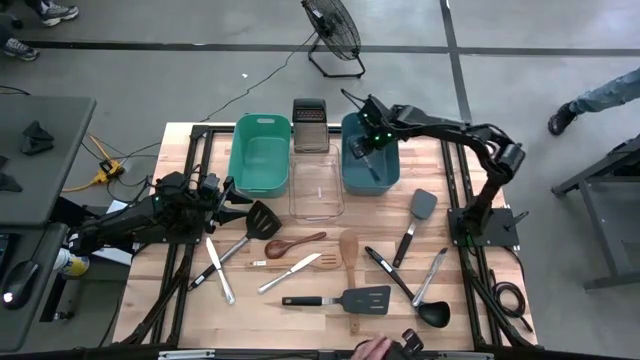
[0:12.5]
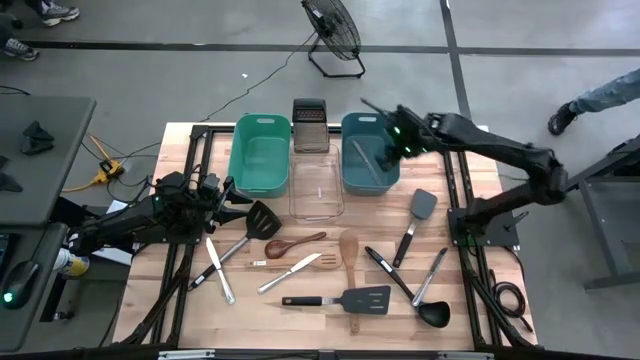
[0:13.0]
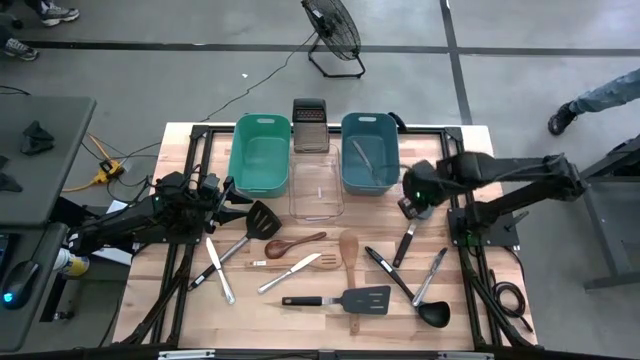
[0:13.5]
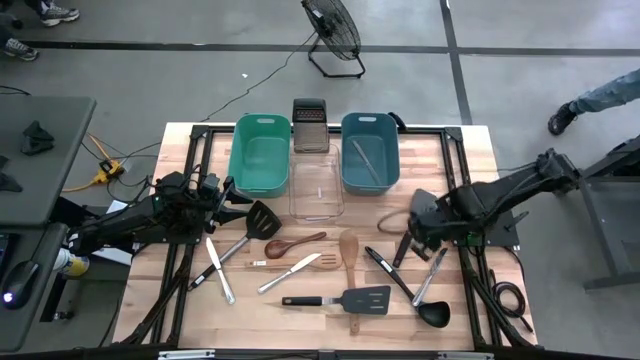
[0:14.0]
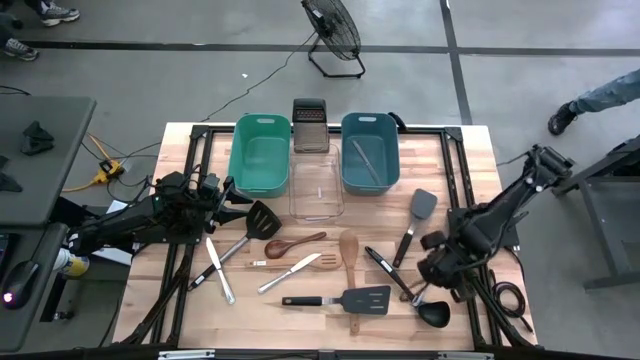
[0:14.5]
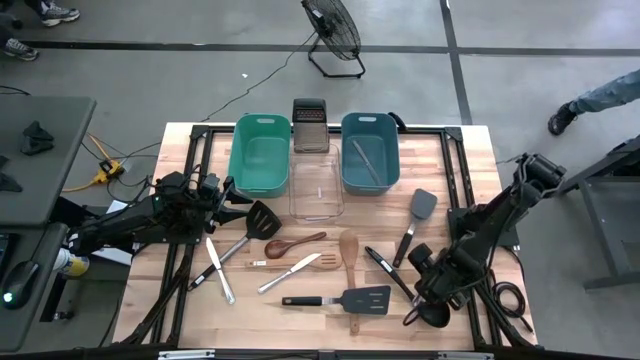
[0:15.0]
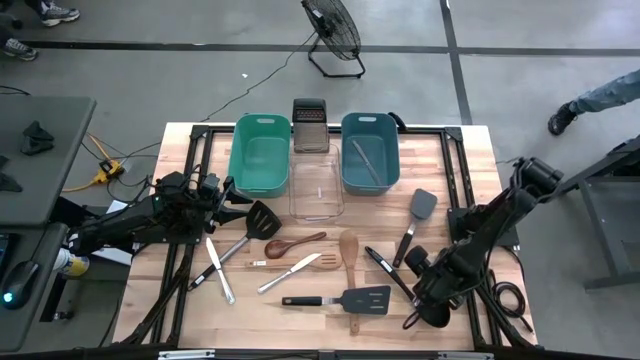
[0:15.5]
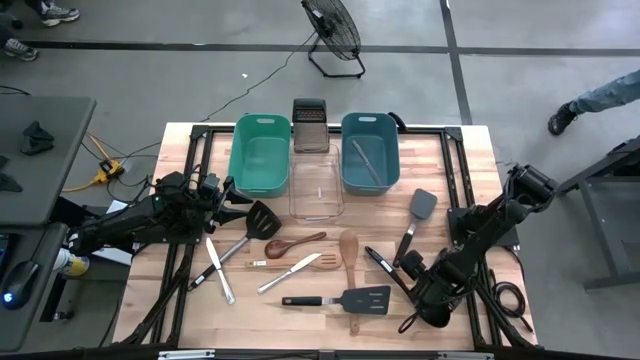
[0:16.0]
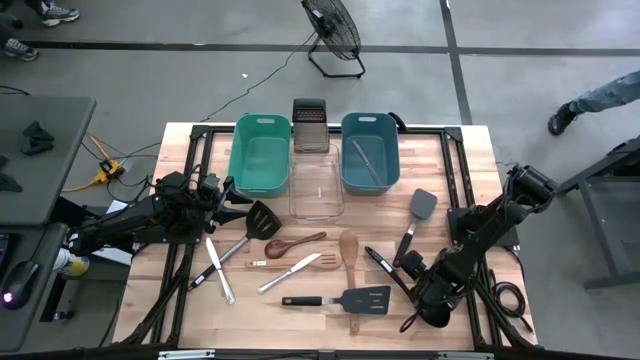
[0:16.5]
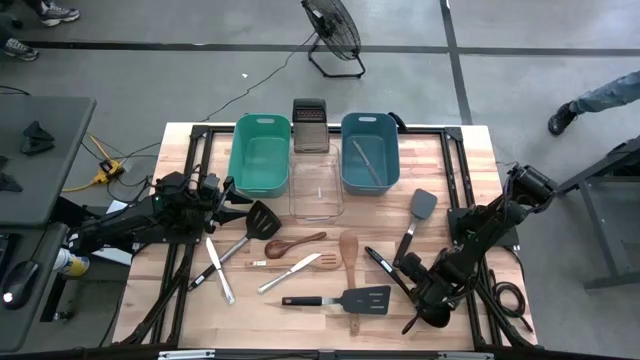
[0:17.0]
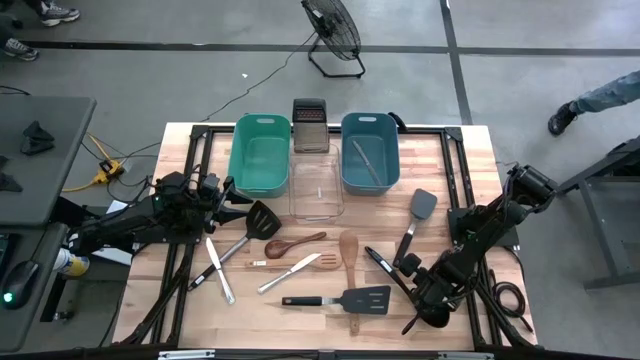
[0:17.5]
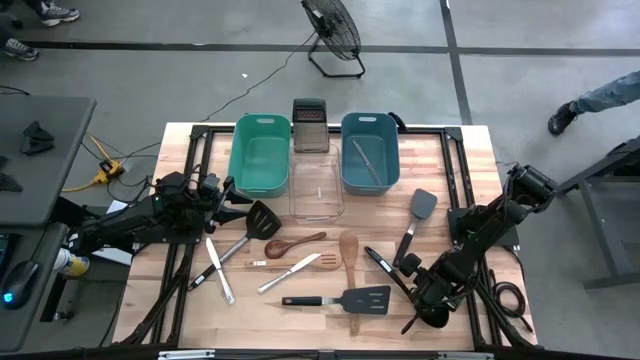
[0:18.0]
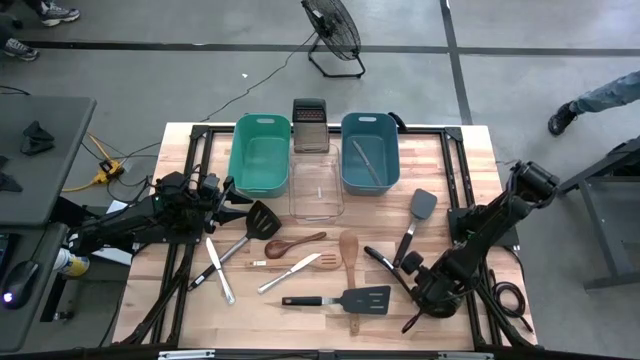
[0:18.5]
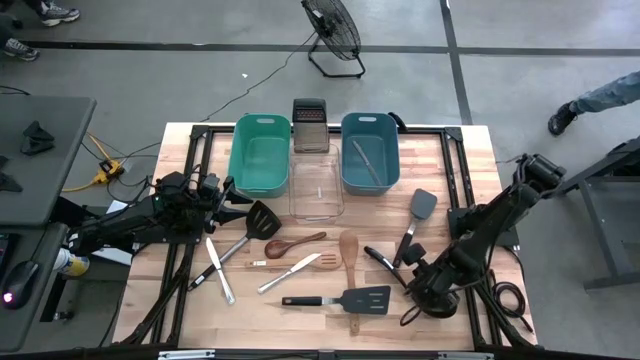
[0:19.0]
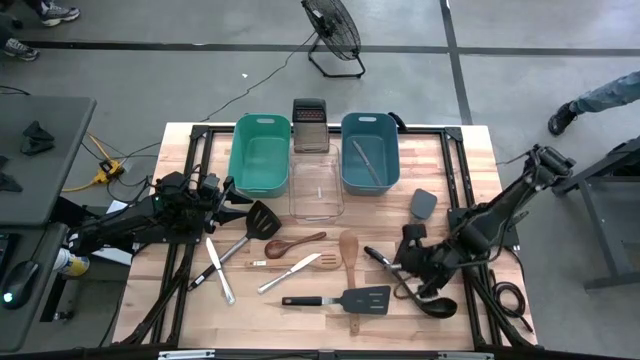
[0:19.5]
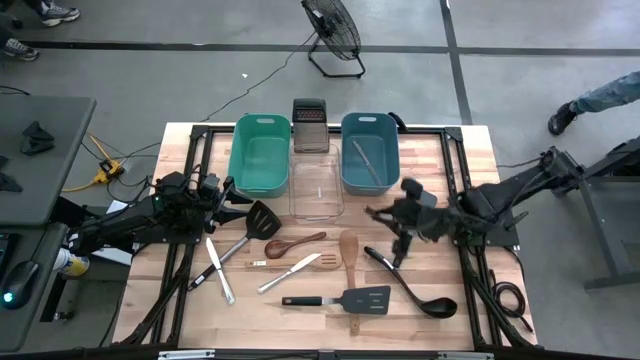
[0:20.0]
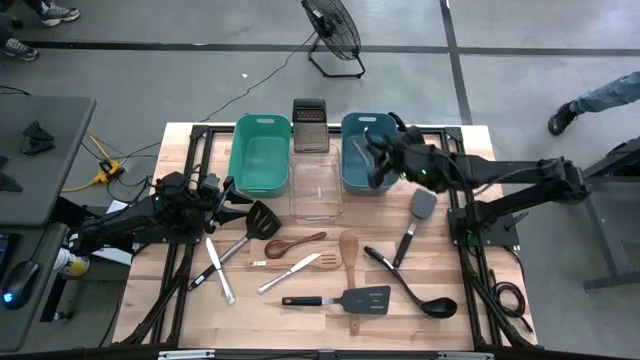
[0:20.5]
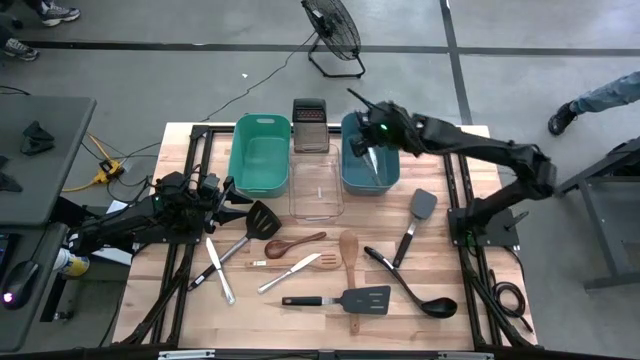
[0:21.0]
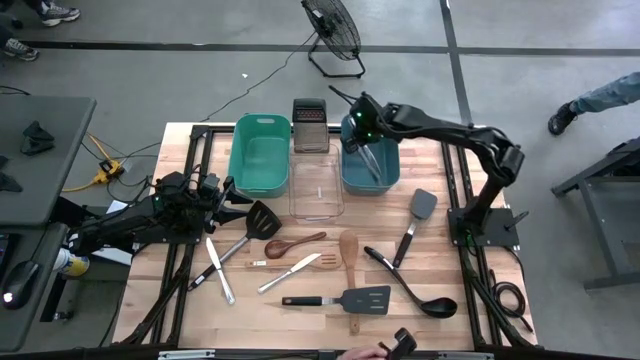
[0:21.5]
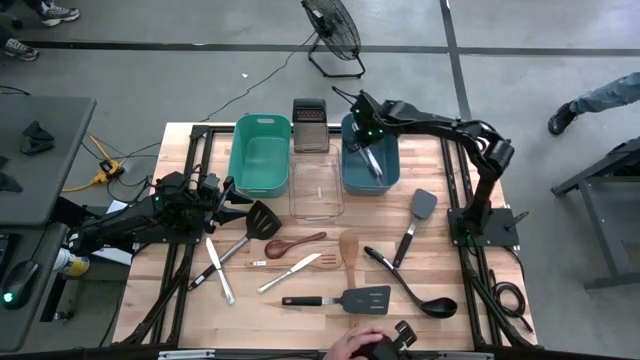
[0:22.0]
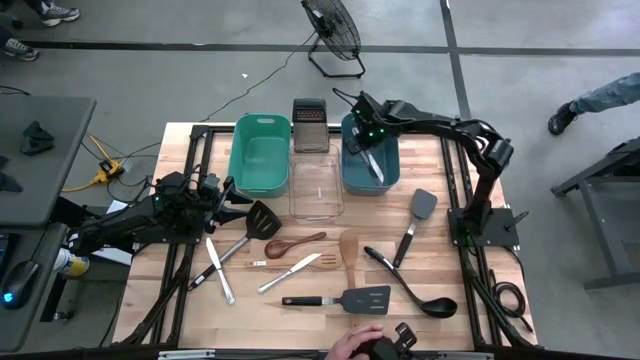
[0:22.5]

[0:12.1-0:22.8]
Task: Pick & Place Kitchen Items
Put the right table knife into the blue bin

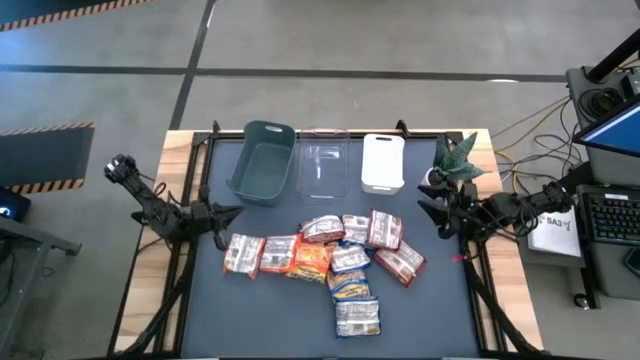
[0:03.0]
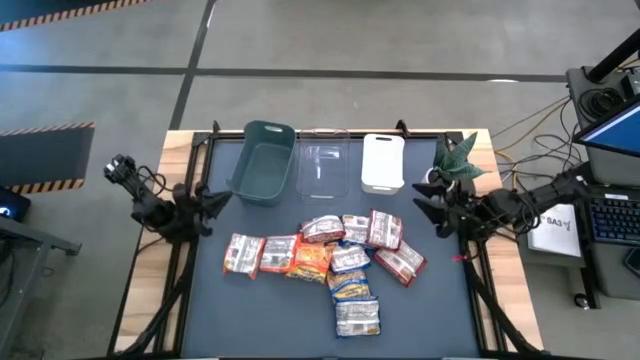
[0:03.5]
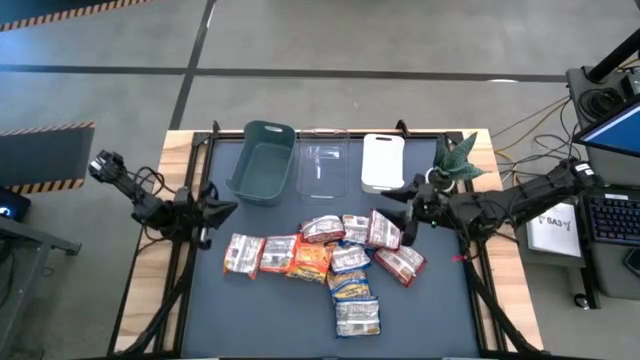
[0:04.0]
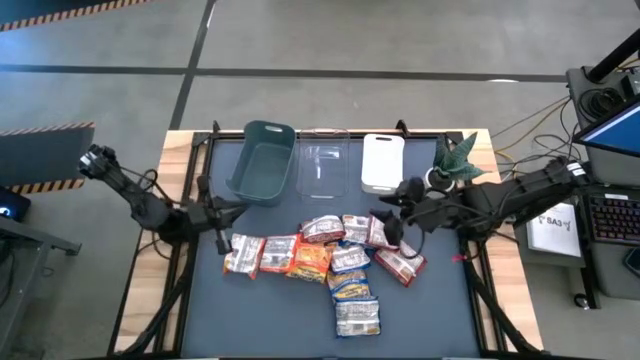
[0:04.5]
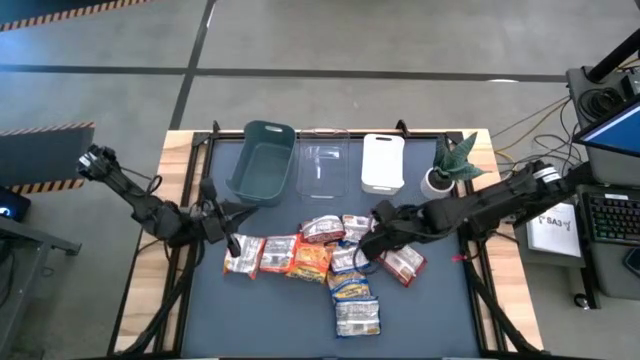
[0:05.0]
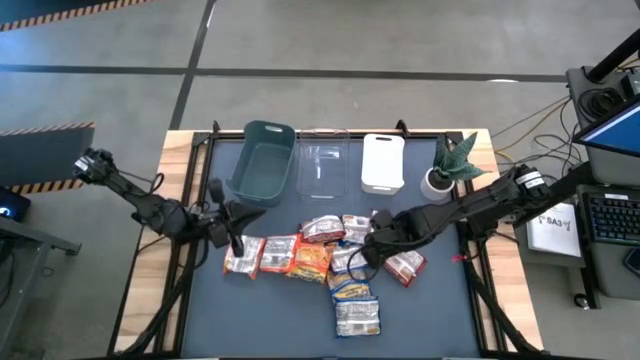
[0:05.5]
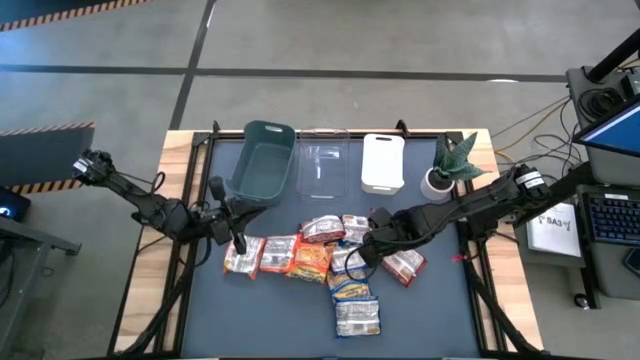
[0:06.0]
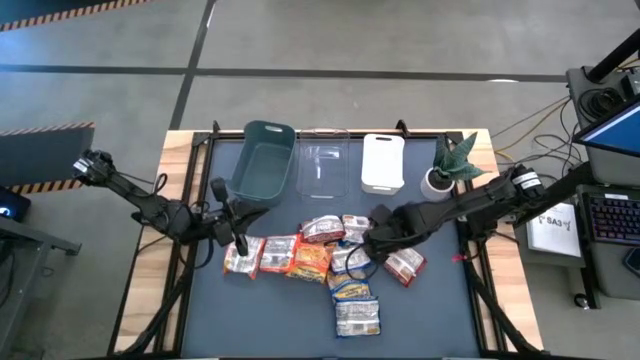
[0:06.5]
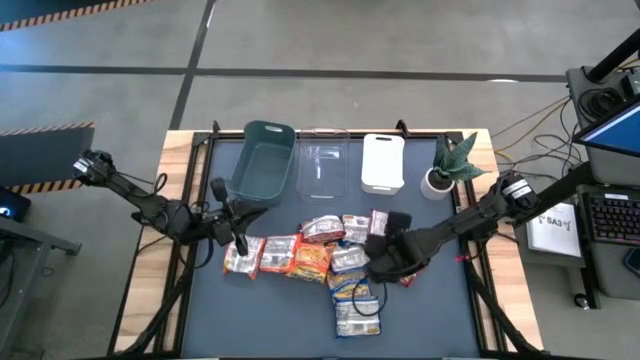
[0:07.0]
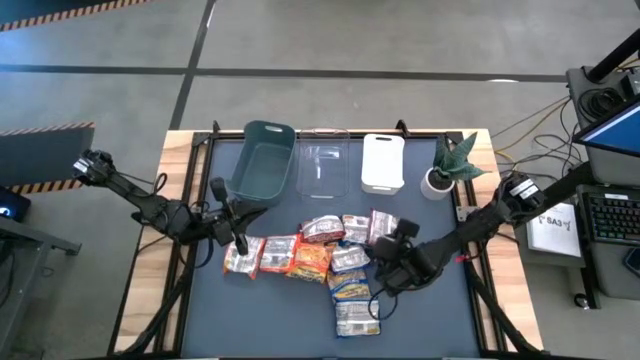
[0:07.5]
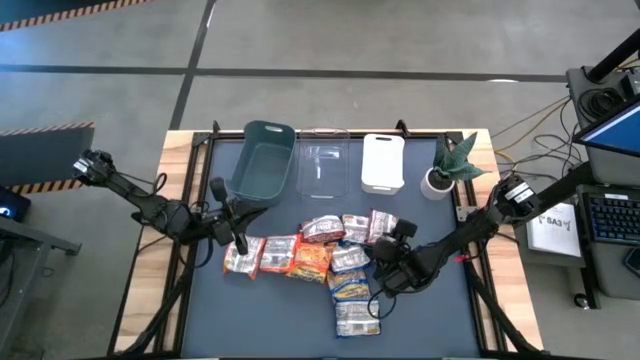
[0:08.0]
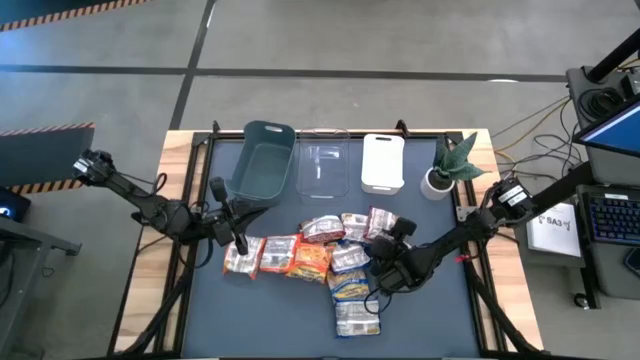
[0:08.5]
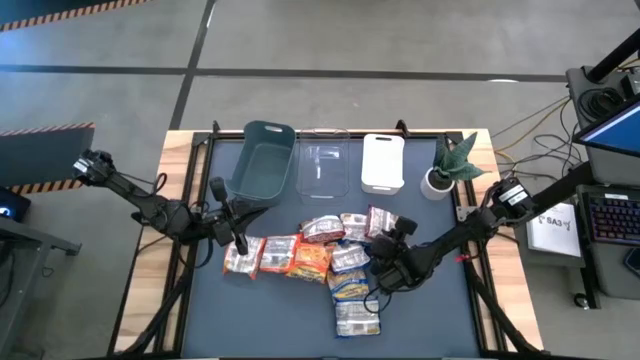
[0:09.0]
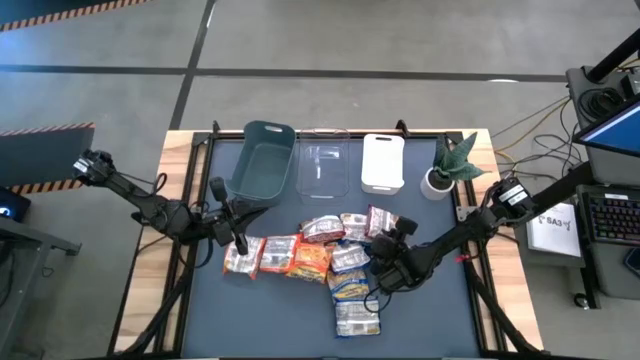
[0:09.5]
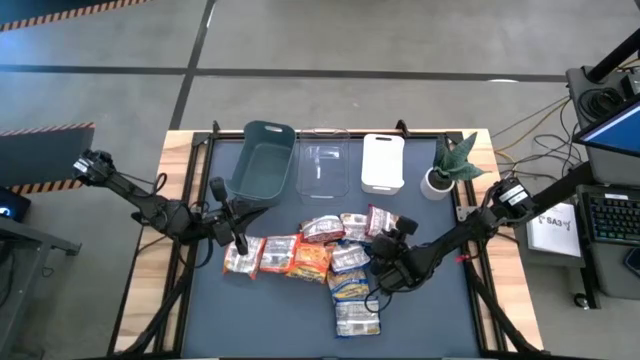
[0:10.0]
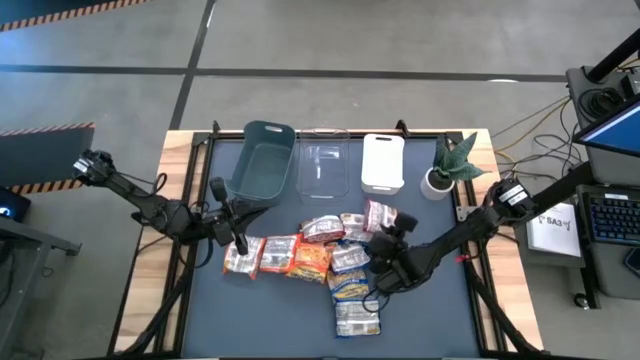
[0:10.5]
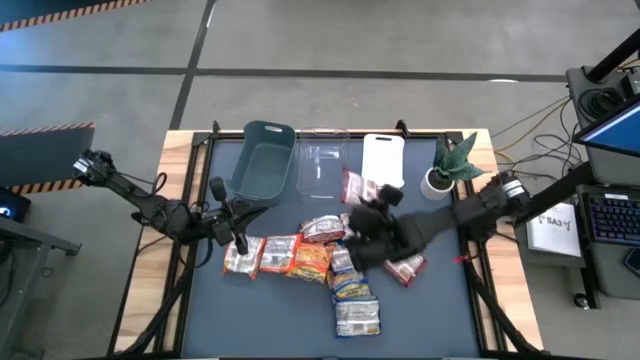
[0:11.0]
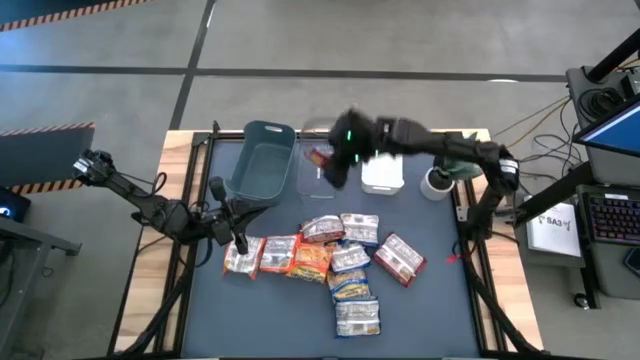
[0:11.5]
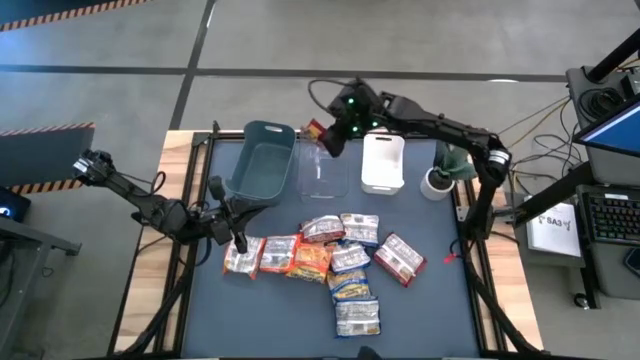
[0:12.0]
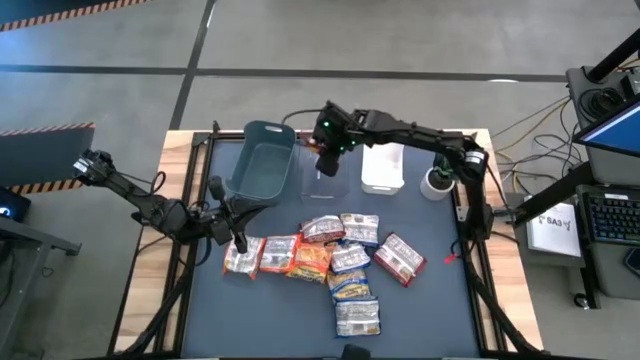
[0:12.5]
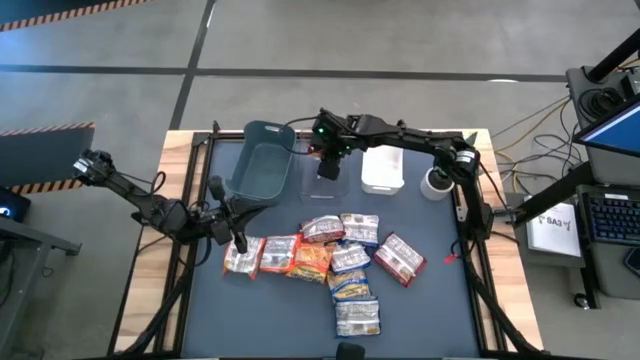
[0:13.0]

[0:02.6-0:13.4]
Task: Sort Maruchan noodles
Put the red noodle pack into the transparent bin
